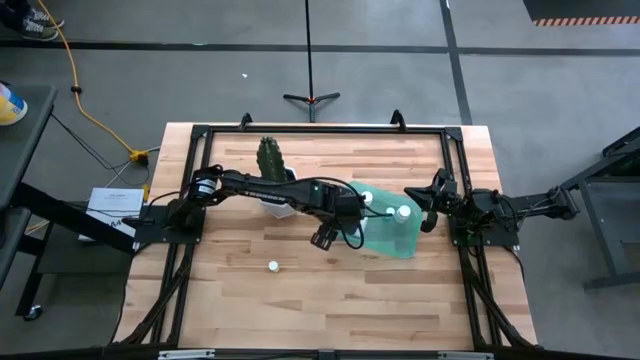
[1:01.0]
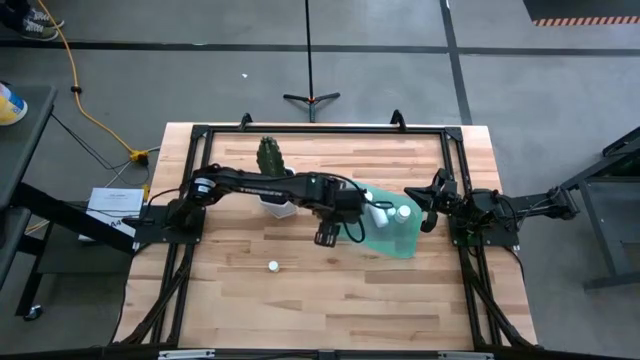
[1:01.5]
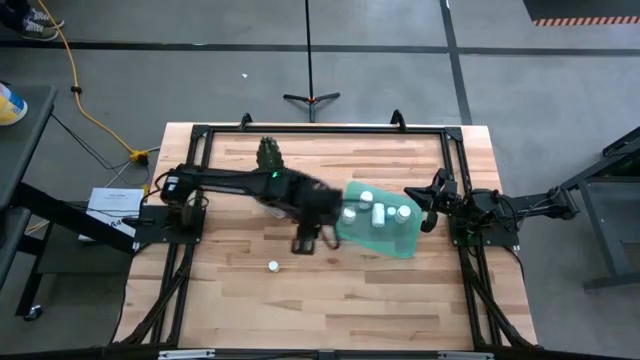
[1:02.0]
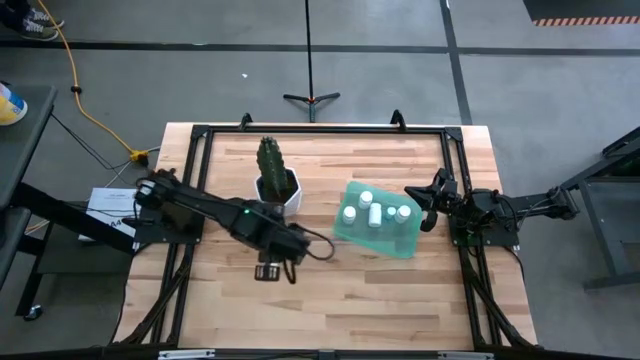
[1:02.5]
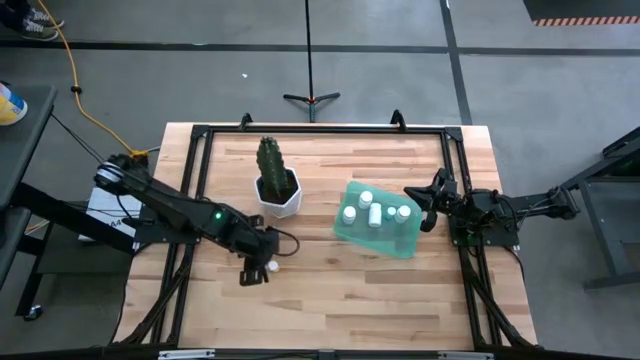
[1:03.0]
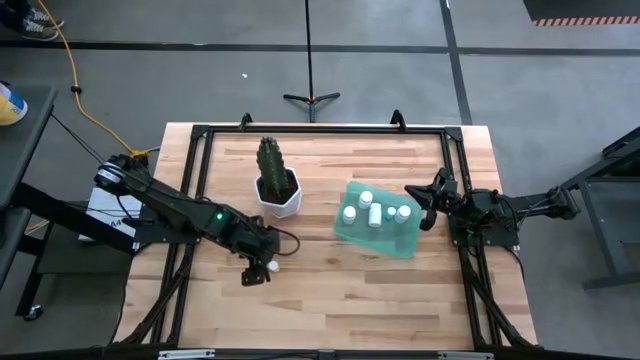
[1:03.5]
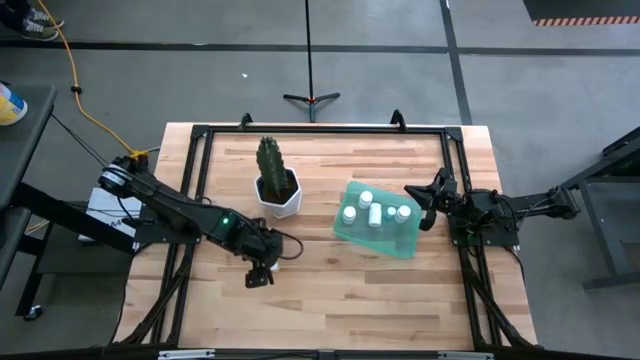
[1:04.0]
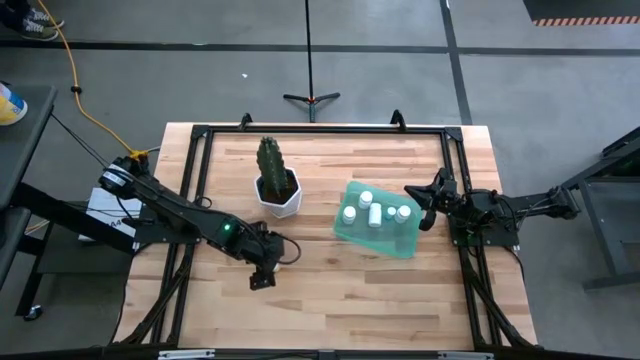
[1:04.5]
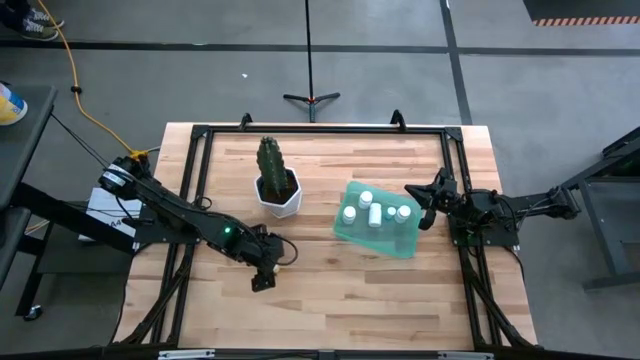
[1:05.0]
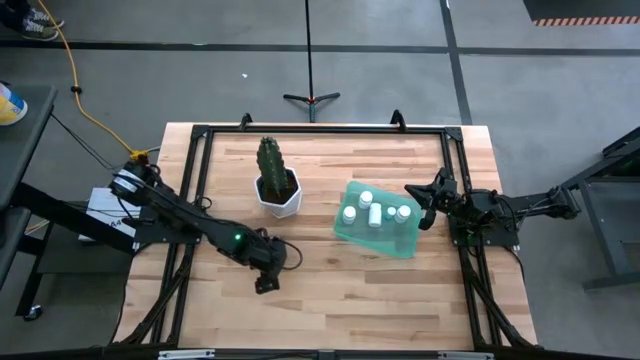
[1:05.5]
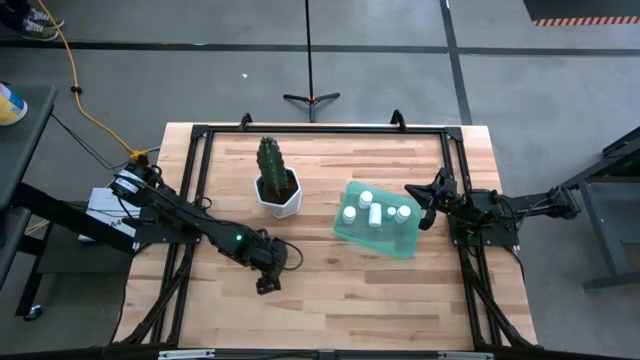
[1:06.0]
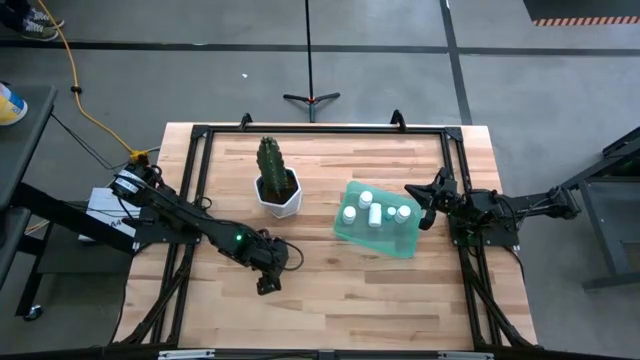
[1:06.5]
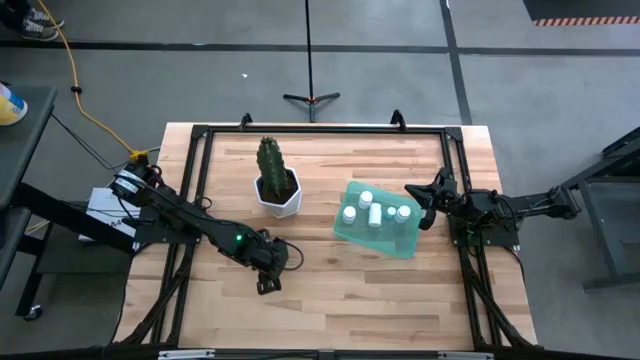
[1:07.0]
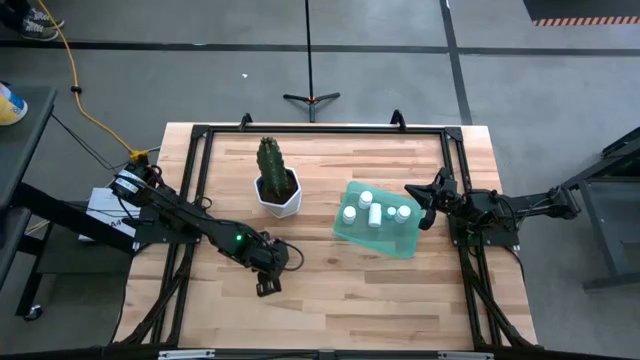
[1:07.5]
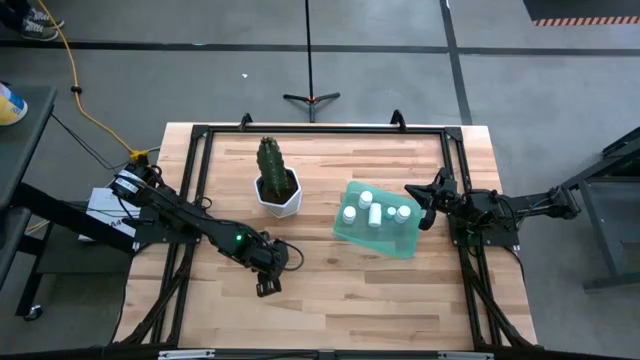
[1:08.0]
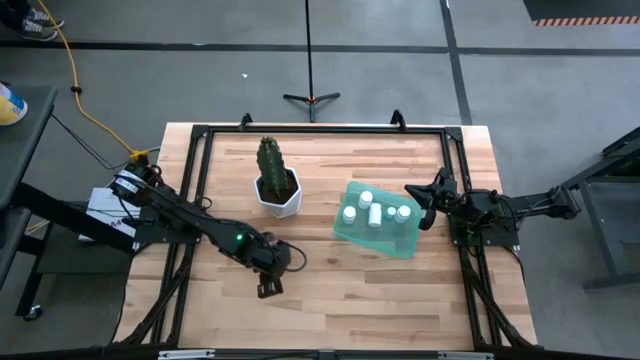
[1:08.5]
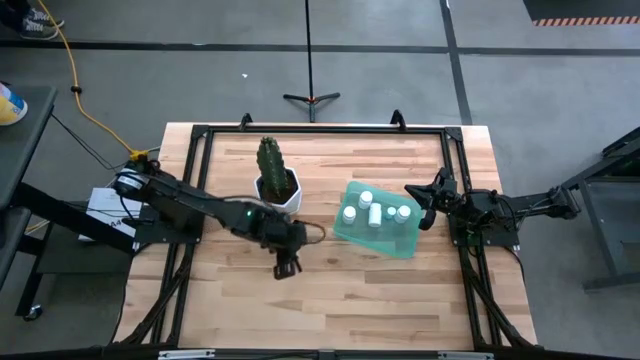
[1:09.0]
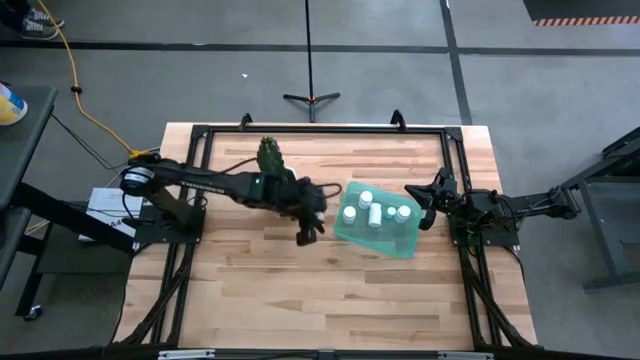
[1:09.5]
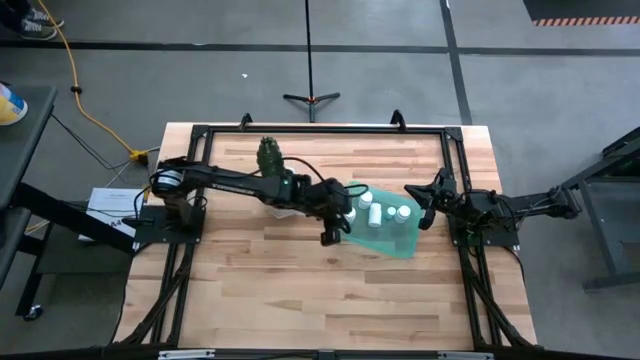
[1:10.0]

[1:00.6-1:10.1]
Task: Pick and place pill bottles into a basket
Put the yellow pill bottle into the light green bin

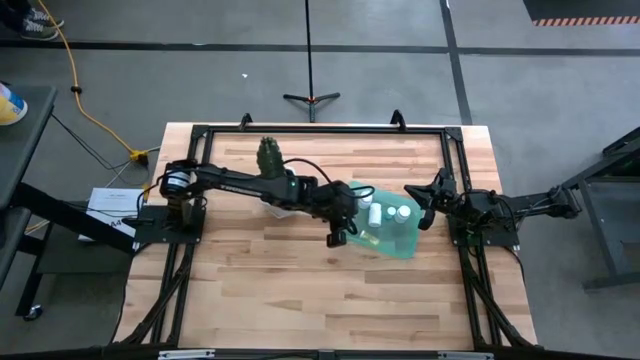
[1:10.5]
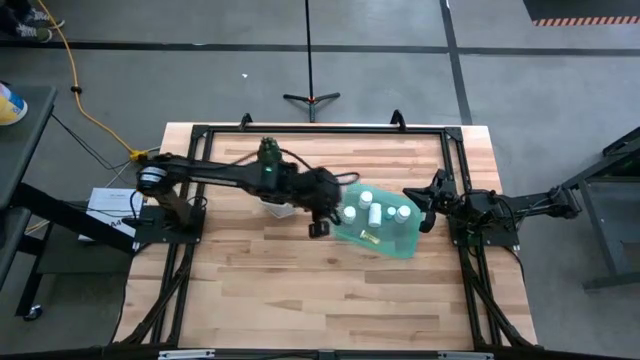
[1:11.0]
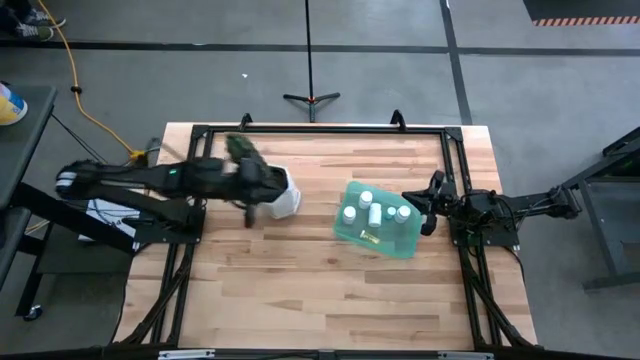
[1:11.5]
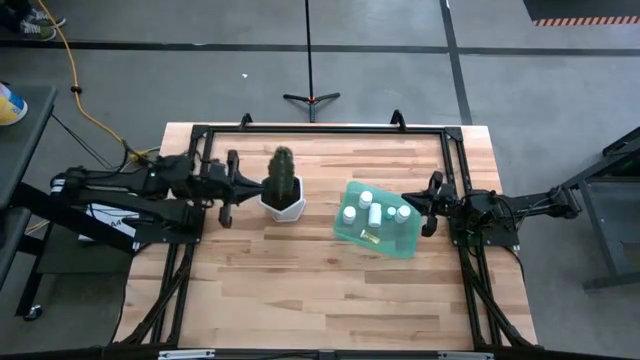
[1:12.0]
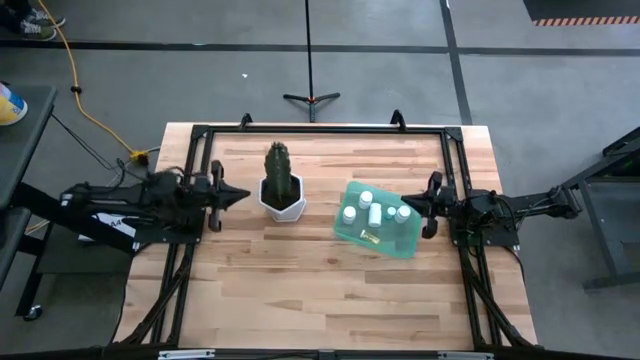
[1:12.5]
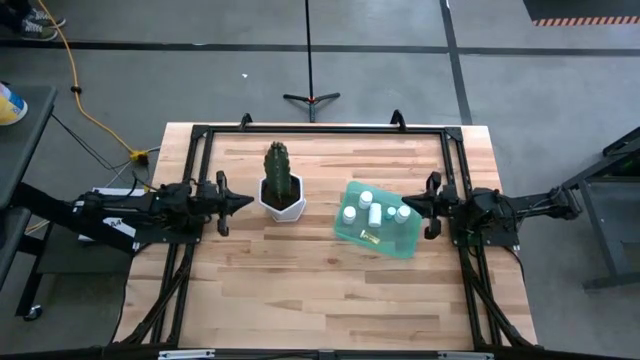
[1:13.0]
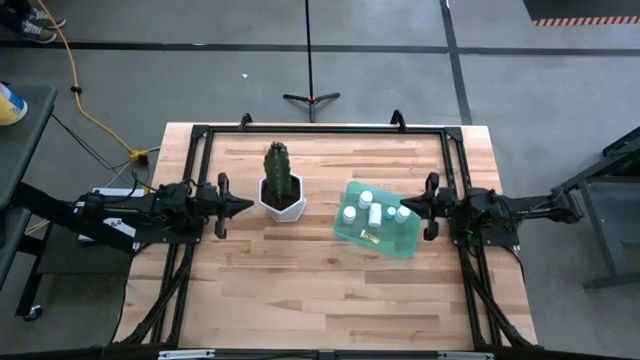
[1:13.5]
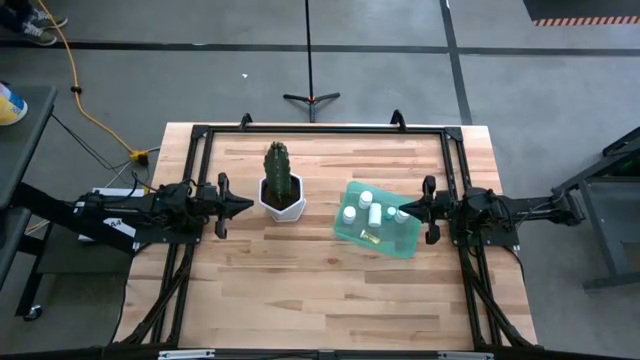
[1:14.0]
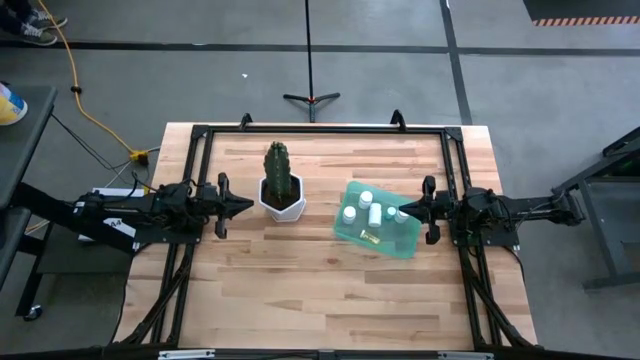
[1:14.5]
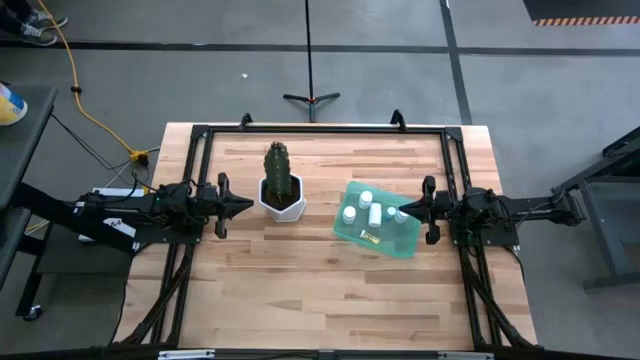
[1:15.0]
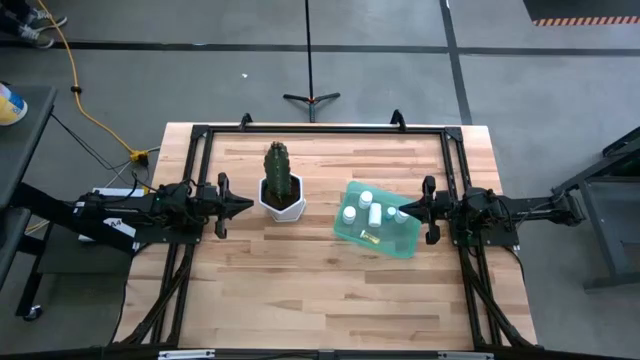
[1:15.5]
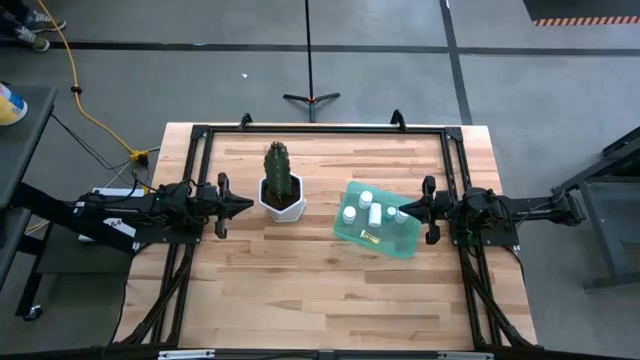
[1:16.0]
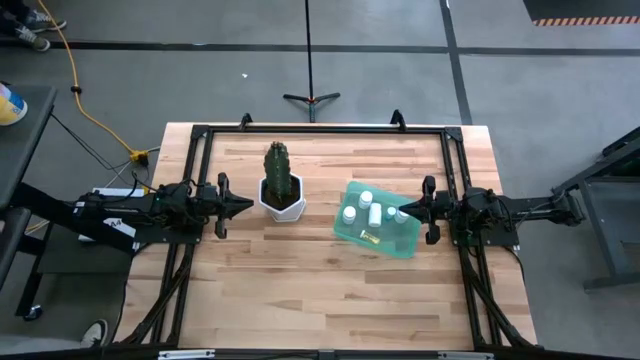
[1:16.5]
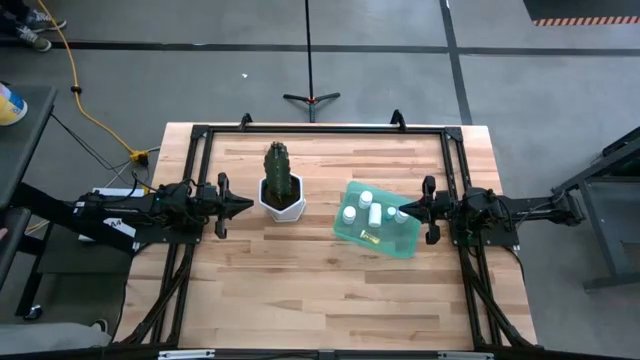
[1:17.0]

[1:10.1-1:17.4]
Return to Home Position

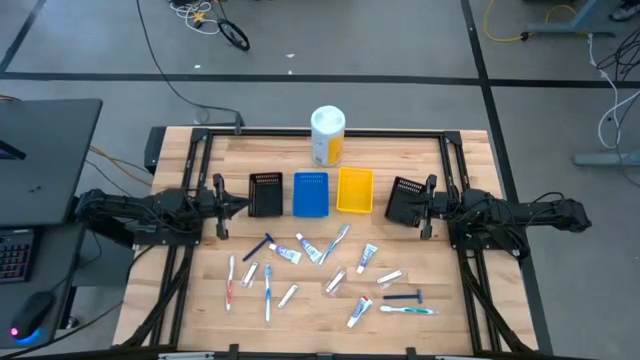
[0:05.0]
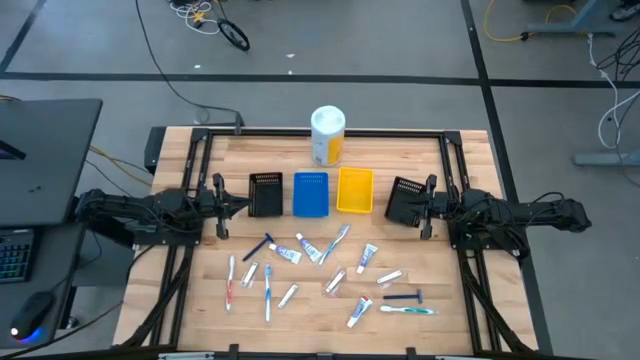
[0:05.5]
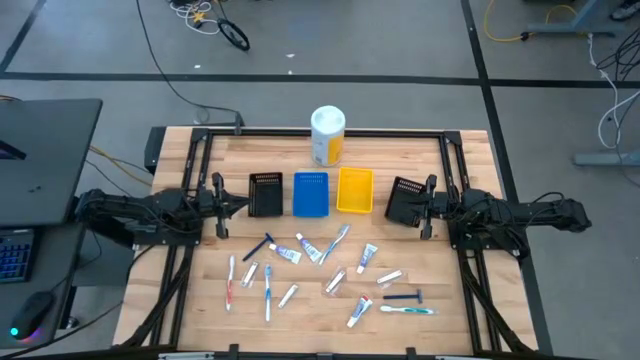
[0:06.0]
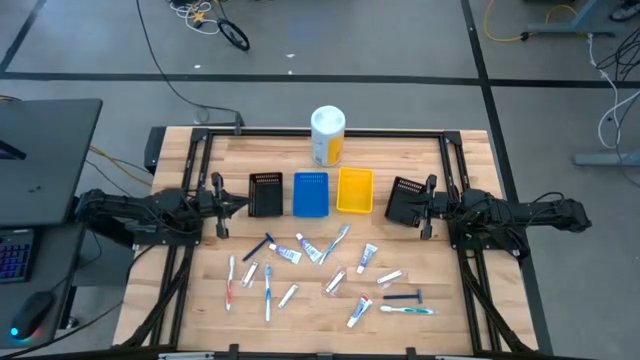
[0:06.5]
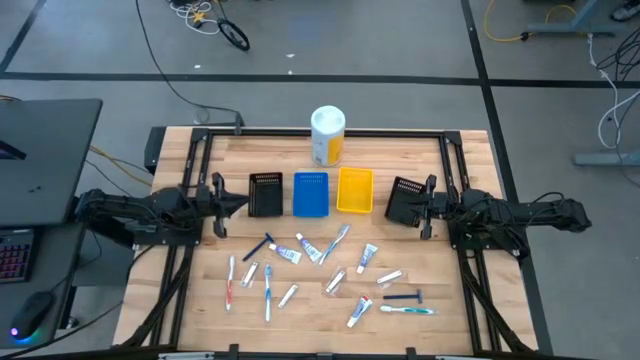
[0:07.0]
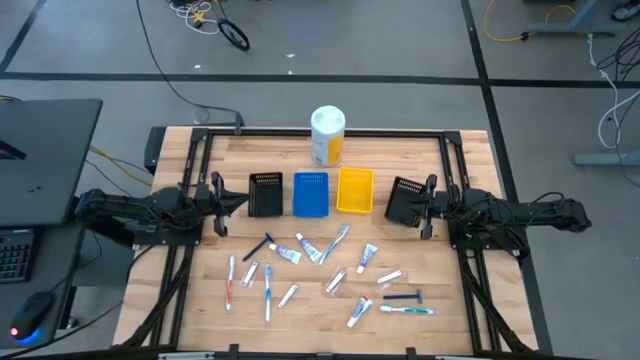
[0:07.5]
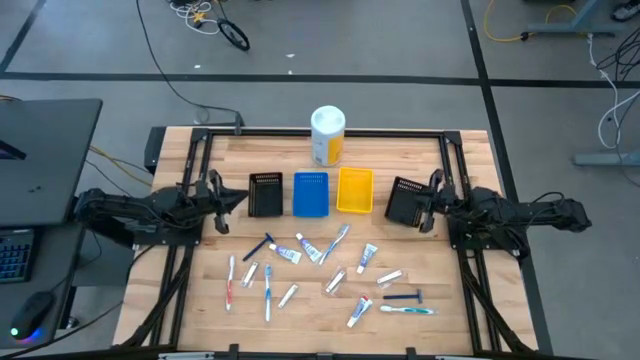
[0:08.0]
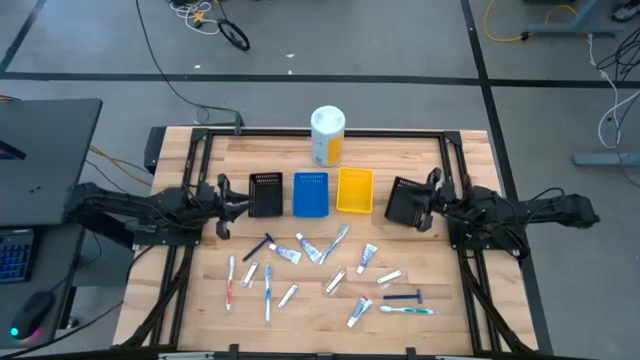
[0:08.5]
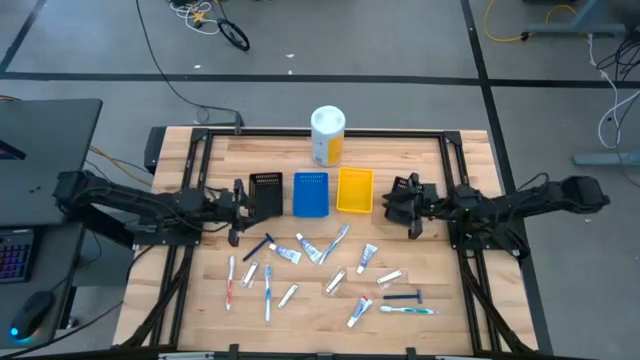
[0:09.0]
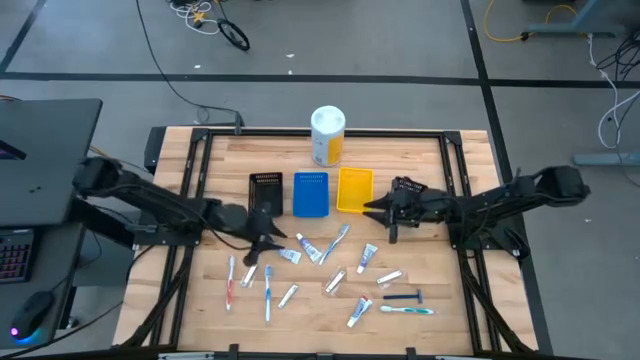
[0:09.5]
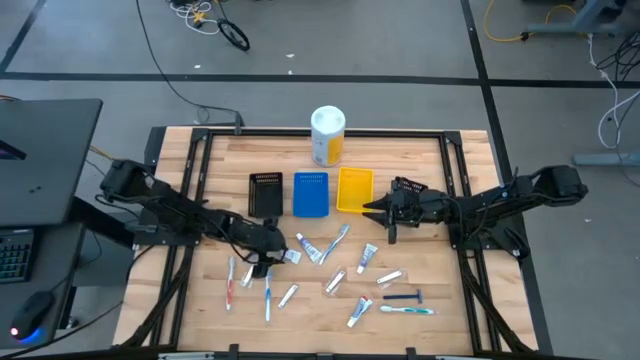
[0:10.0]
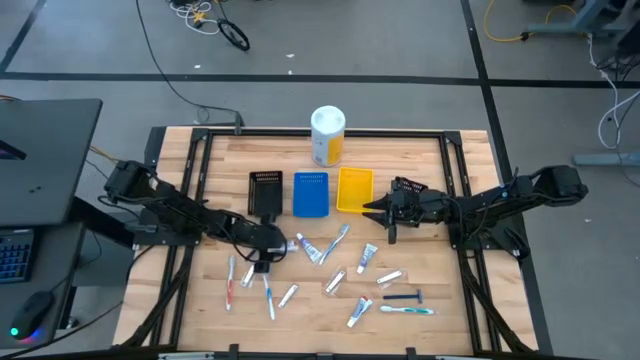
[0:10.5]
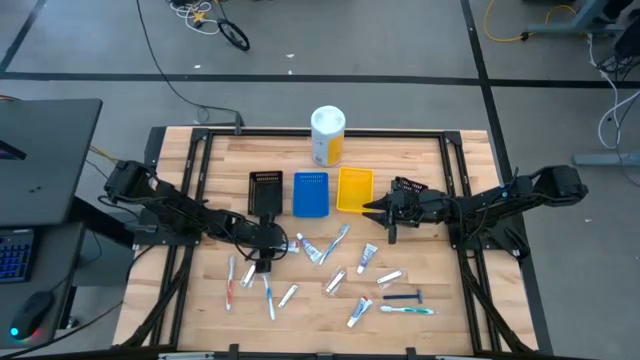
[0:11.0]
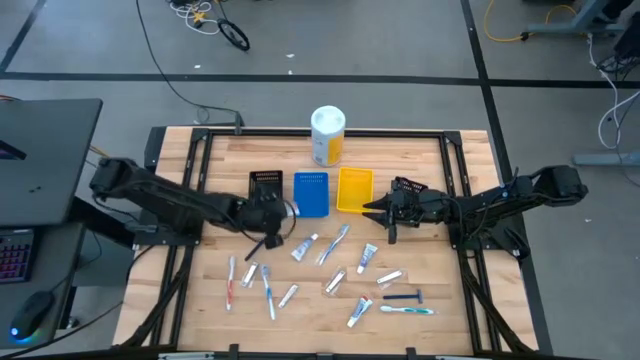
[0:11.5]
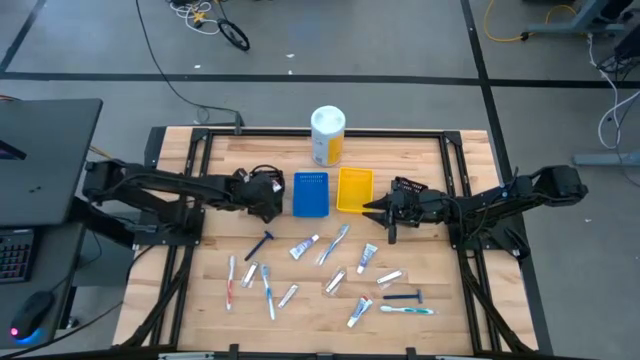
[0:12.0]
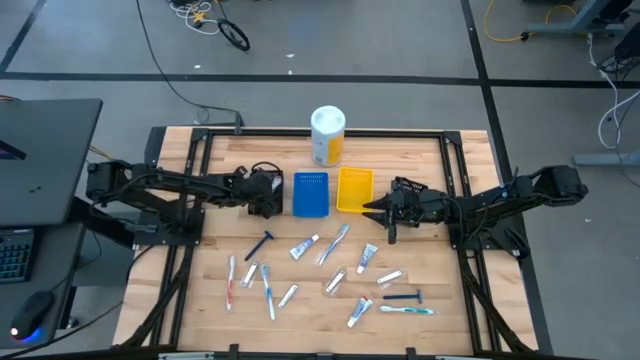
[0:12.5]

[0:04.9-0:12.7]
Task: Pick & Place Travel size toiletries
Put the white toothpaste into the left black bin
